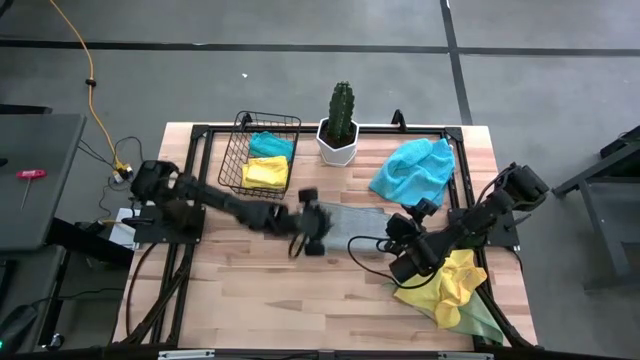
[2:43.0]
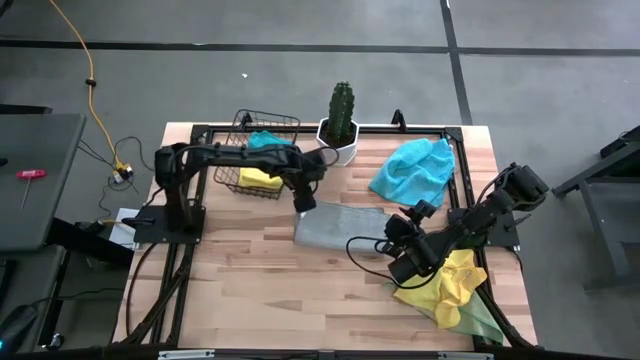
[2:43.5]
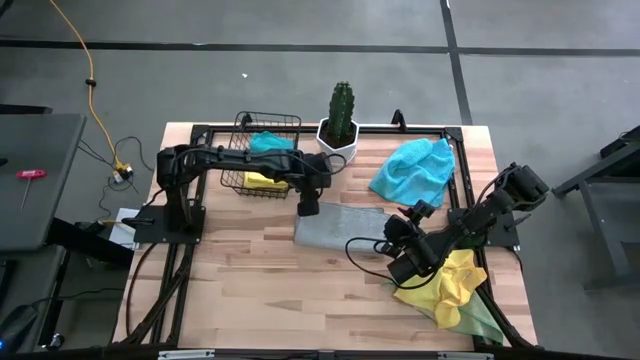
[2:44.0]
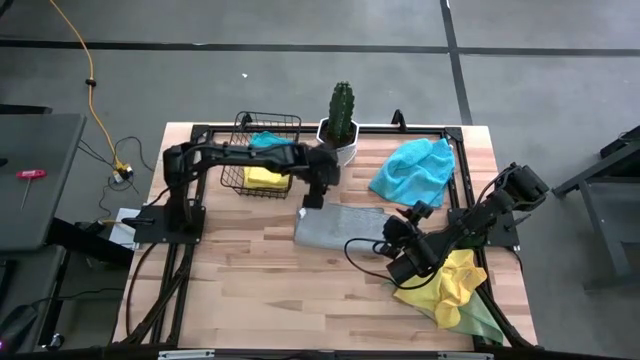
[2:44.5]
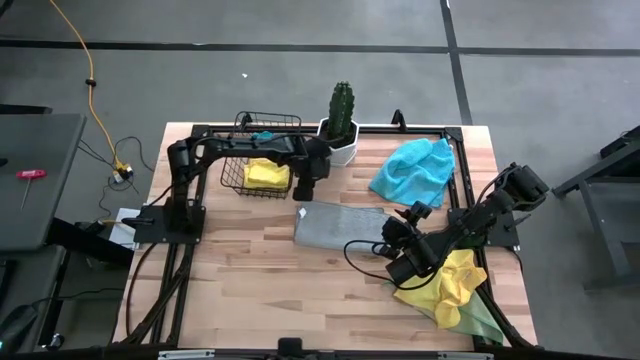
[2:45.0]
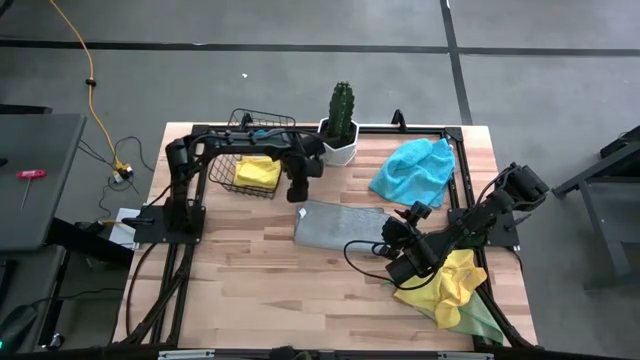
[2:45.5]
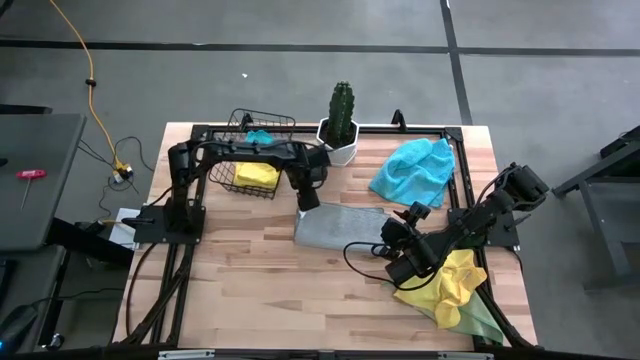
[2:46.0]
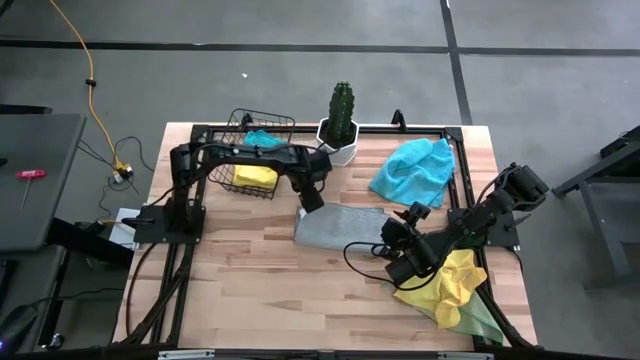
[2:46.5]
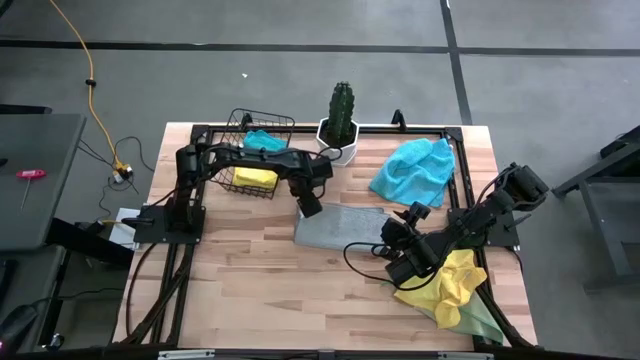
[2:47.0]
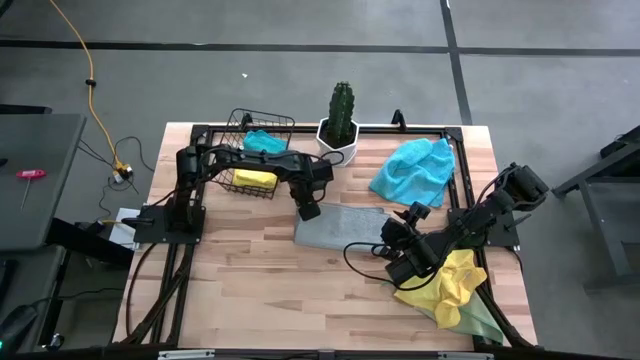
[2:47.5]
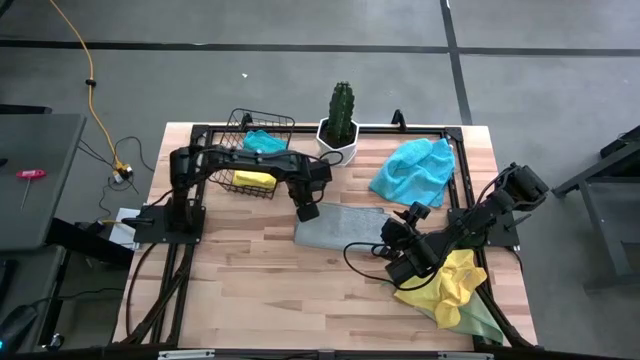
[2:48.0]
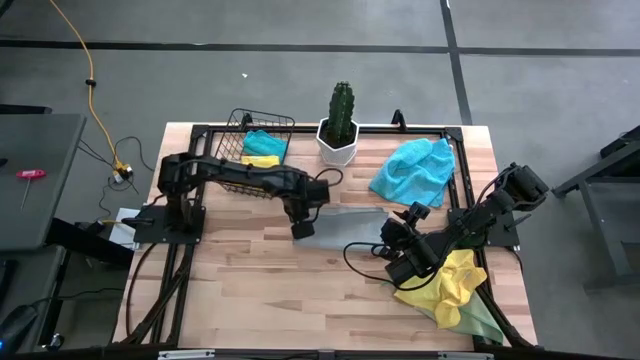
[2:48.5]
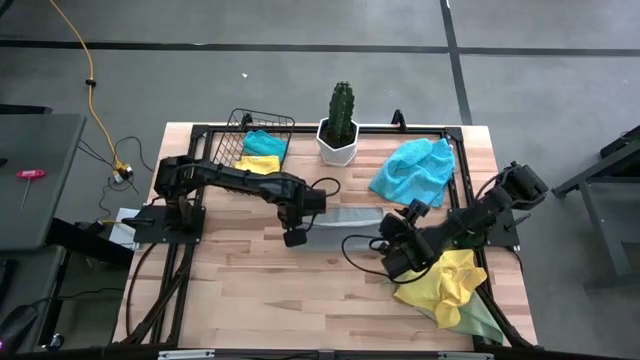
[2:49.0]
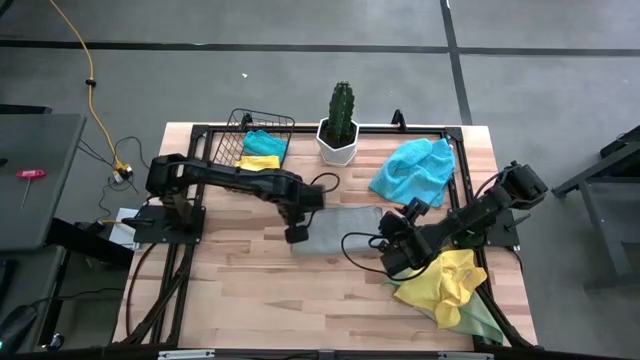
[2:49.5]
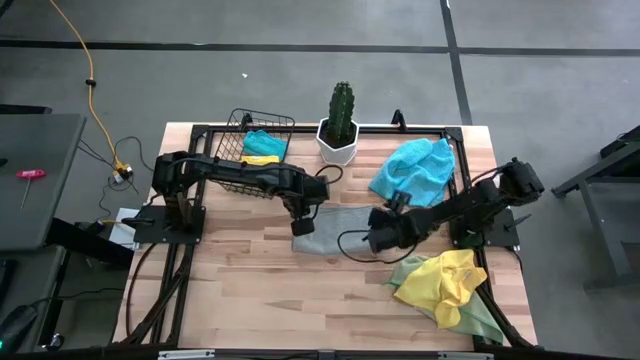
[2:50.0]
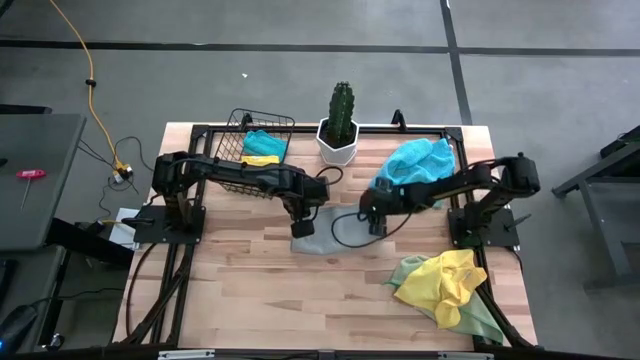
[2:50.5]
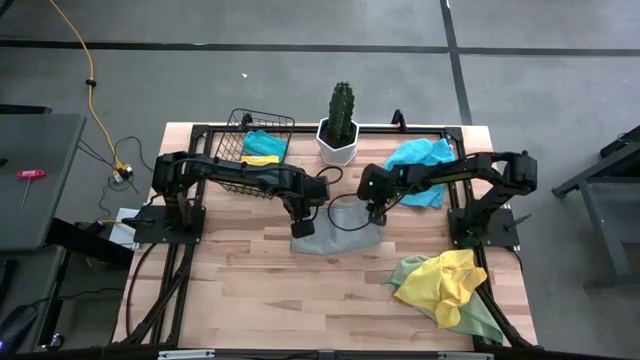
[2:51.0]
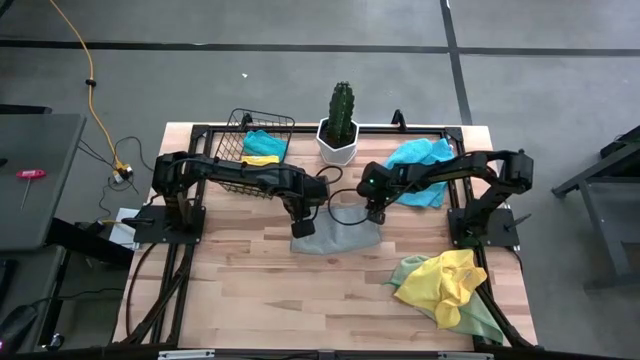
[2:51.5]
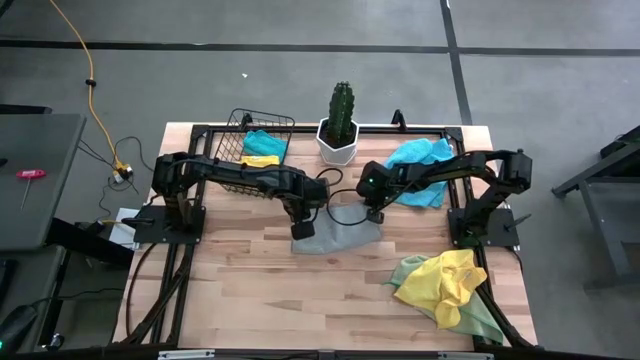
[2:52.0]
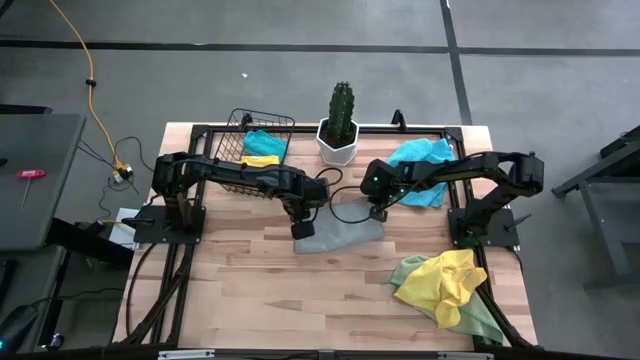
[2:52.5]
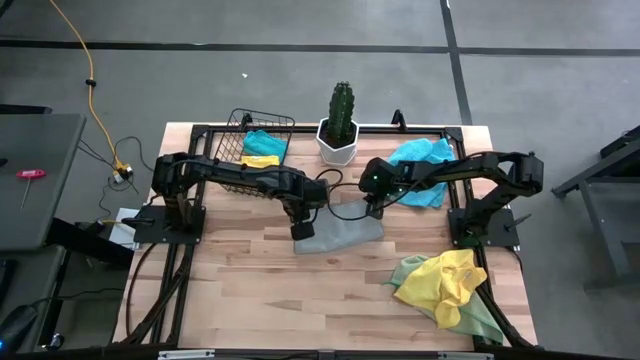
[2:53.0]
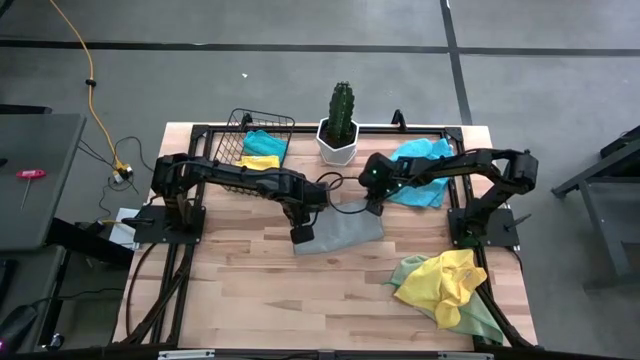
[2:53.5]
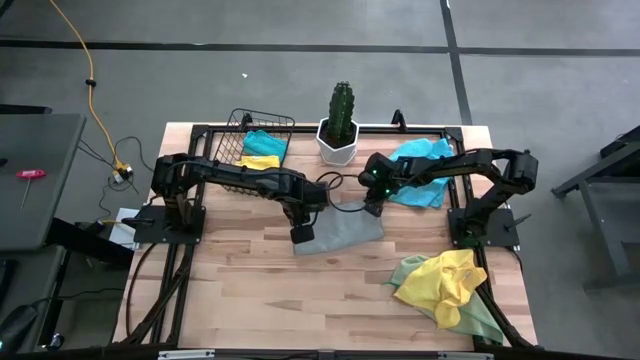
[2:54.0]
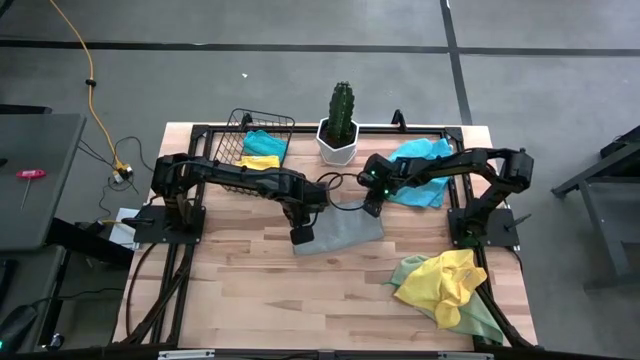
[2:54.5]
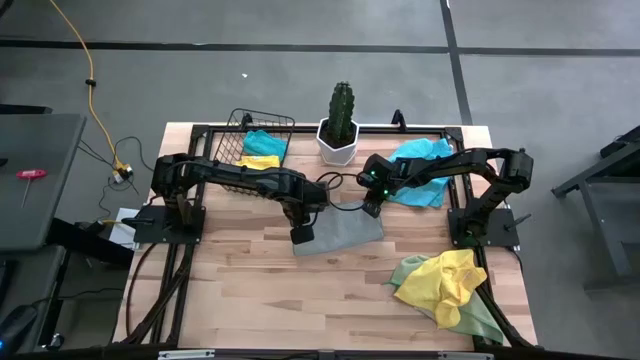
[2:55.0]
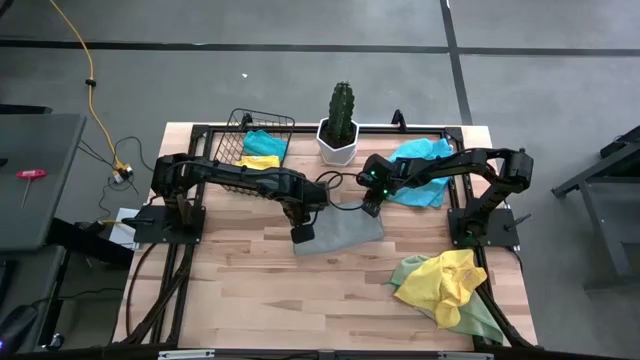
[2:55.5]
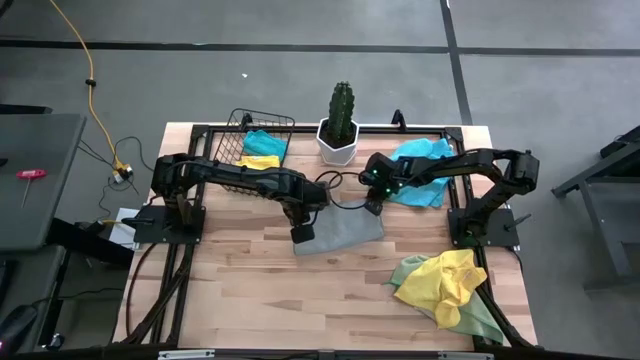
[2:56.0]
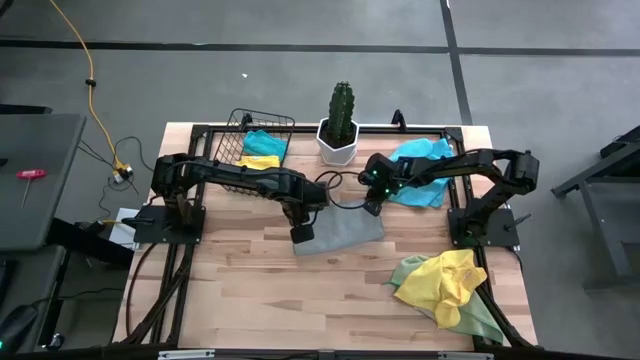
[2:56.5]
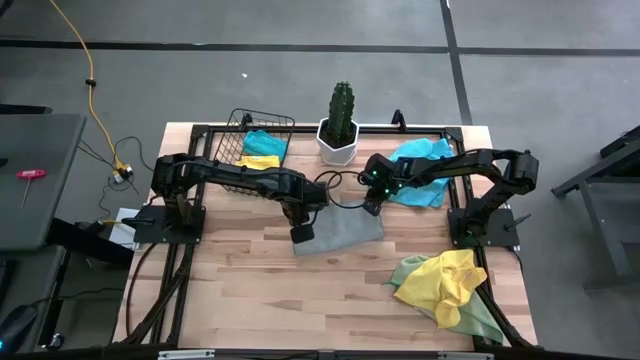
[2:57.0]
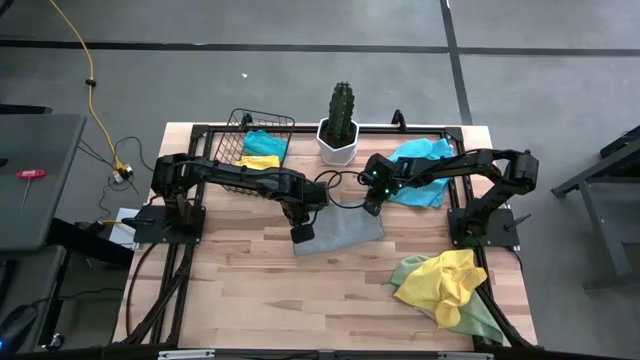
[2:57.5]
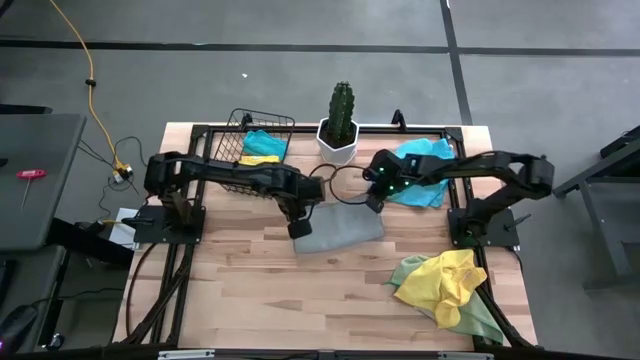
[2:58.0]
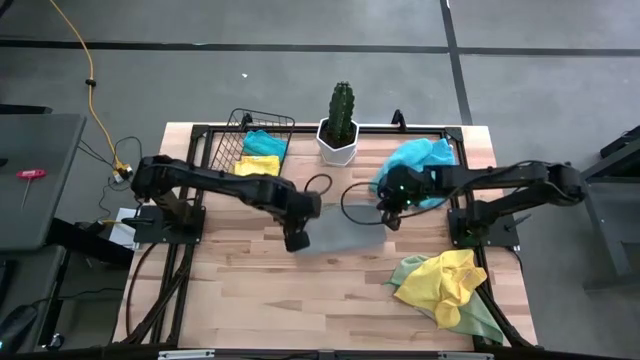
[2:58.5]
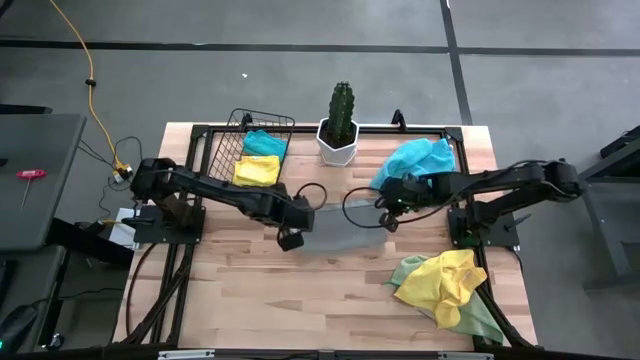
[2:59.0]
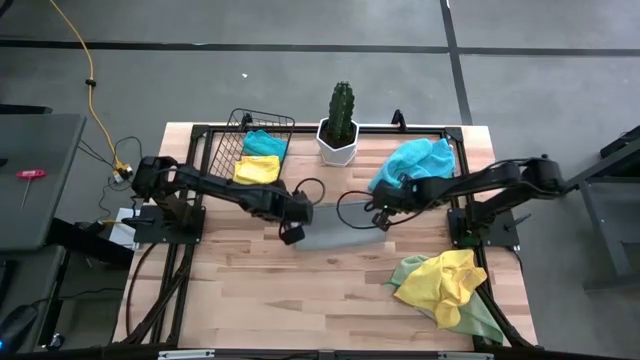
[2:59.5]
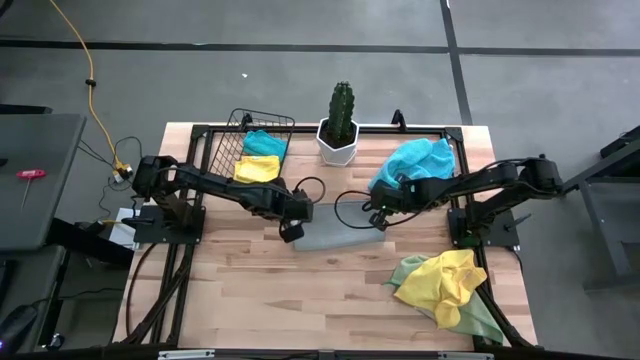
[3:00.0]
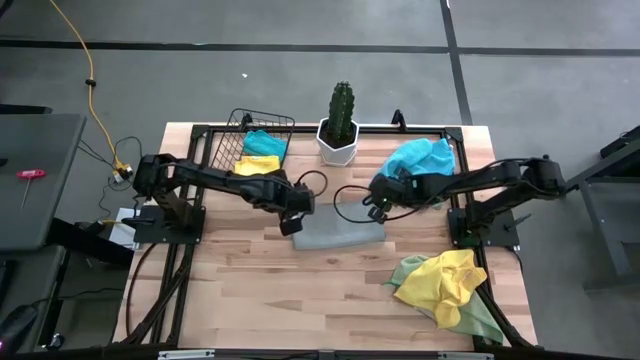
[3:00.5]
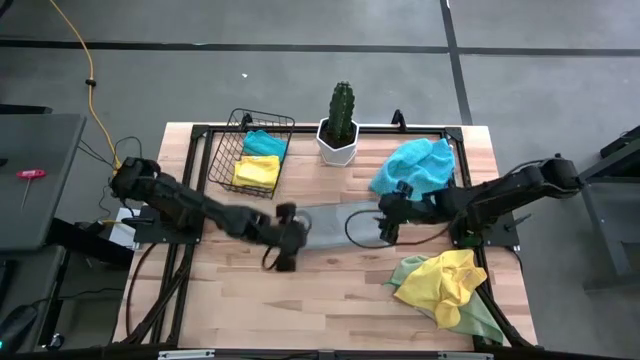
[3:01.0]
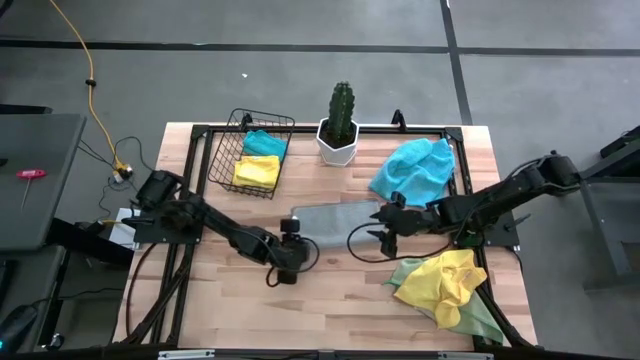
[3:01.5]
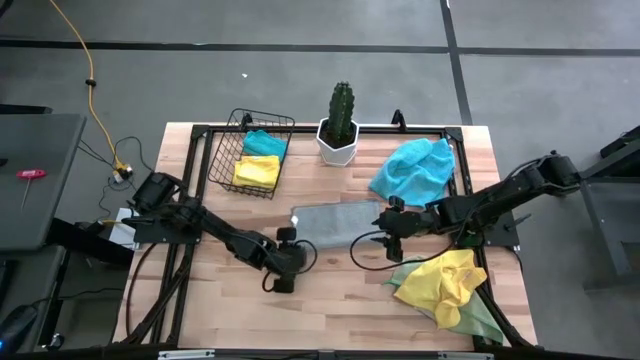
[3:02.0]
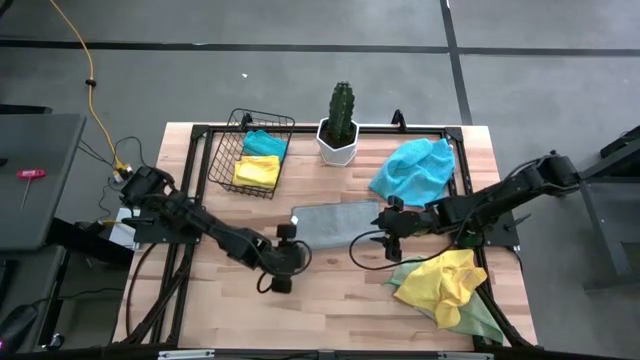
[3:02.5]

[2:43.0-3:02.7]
Task: Fold microfiber towels
Fold the gray microfiber towel on the table

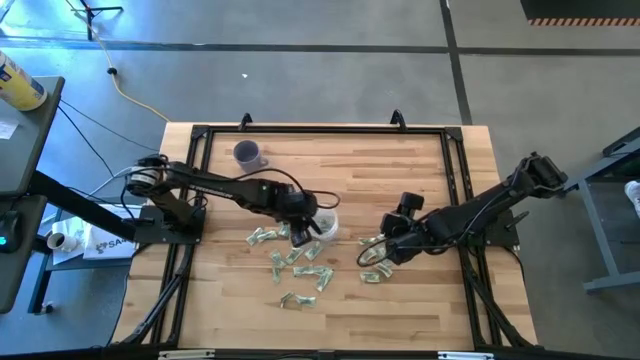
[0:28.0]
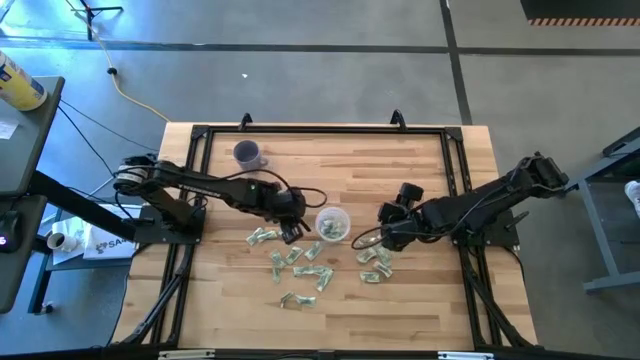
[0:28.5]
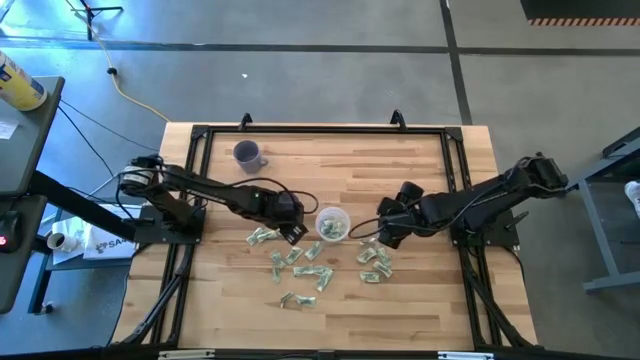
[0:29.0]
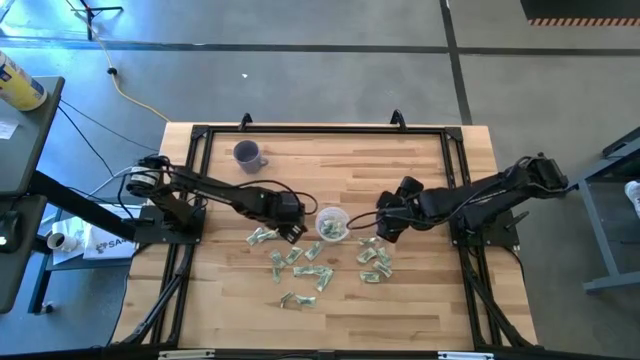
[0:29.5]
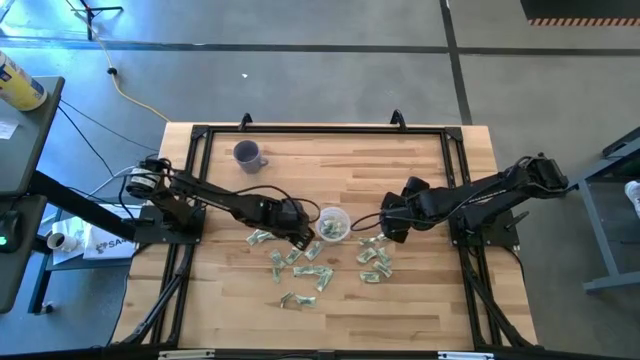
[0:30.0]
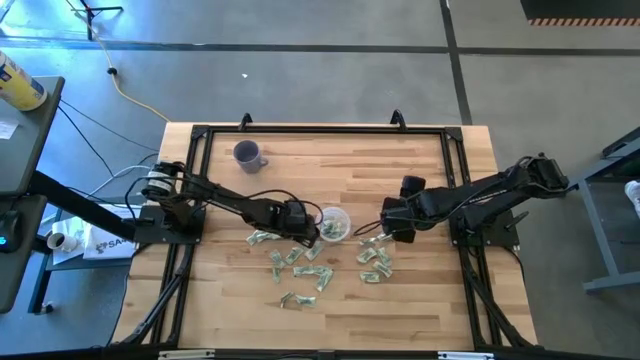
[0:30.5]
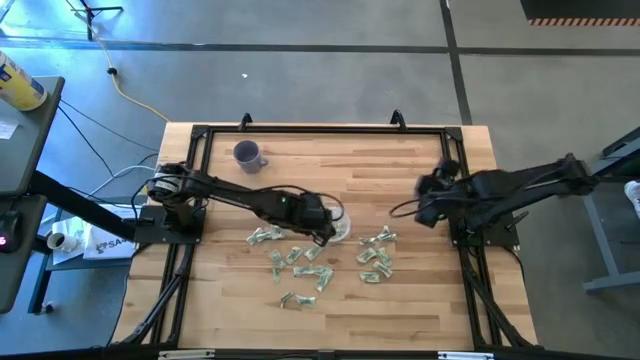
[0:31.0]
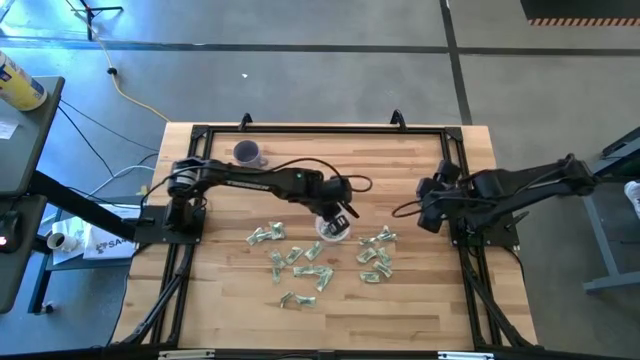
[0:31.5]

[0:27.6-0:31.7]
Task: Pick and place Stevia / Truvia into bins
Put the stevia packet into the transparent container
